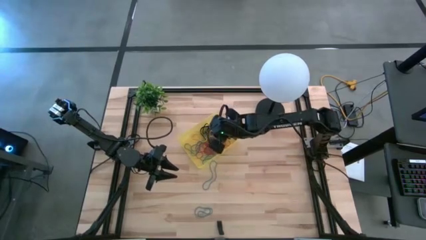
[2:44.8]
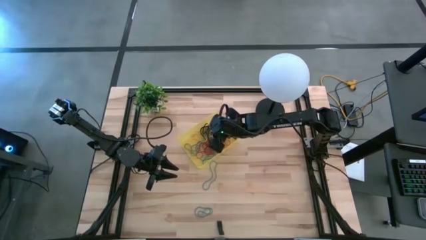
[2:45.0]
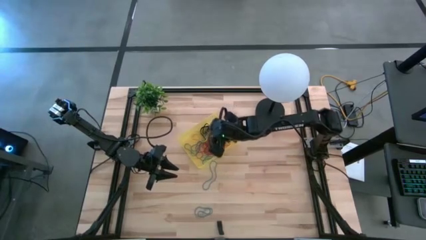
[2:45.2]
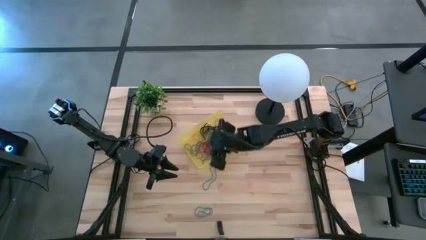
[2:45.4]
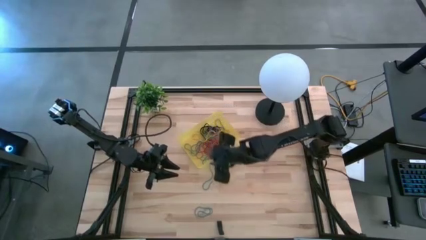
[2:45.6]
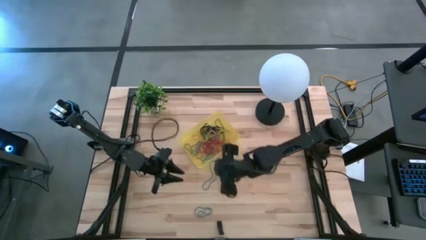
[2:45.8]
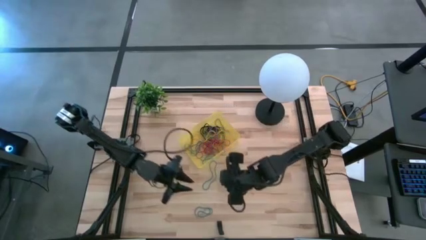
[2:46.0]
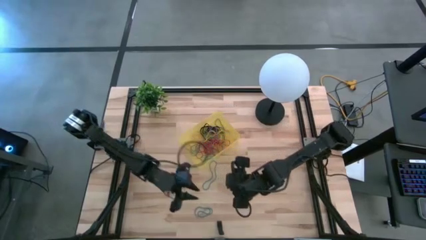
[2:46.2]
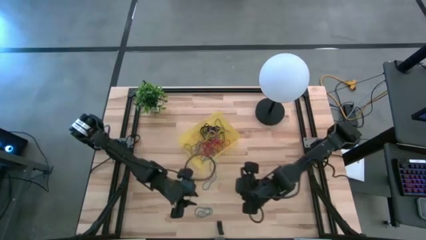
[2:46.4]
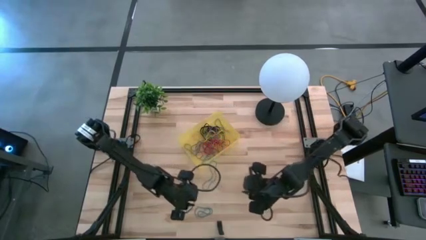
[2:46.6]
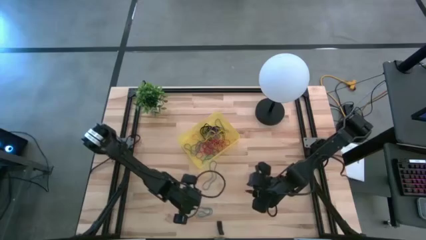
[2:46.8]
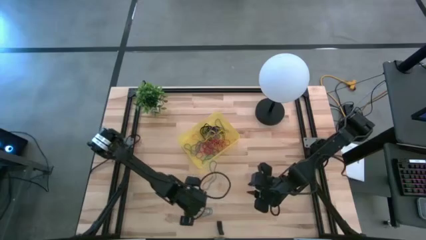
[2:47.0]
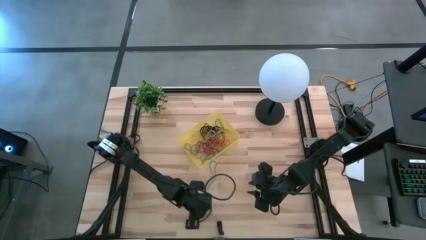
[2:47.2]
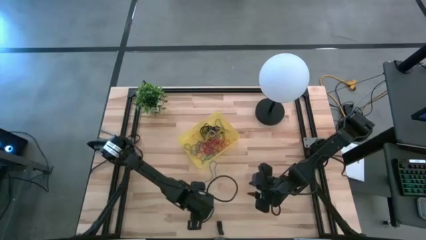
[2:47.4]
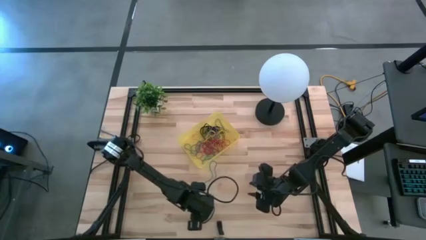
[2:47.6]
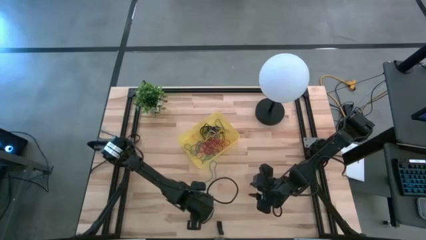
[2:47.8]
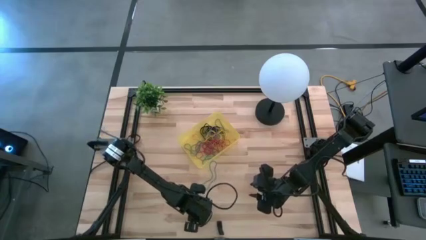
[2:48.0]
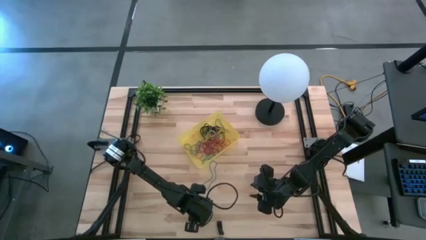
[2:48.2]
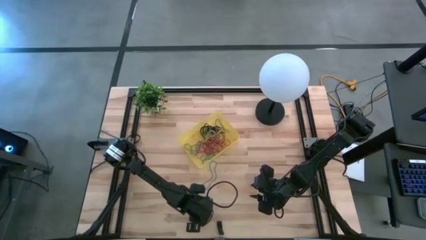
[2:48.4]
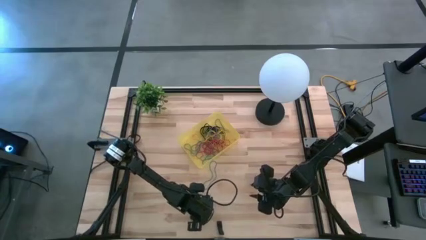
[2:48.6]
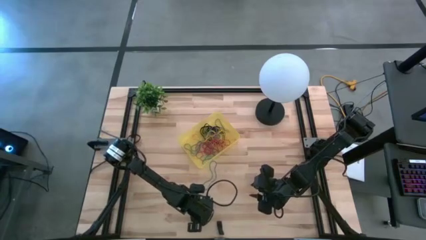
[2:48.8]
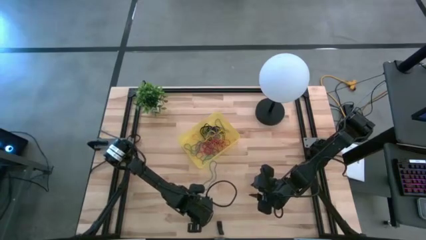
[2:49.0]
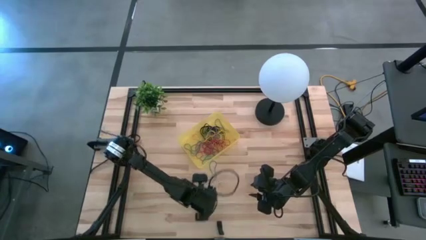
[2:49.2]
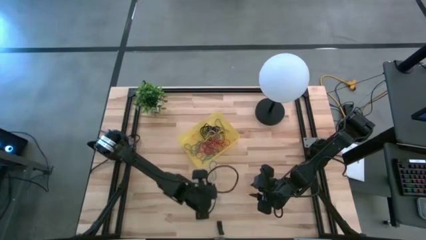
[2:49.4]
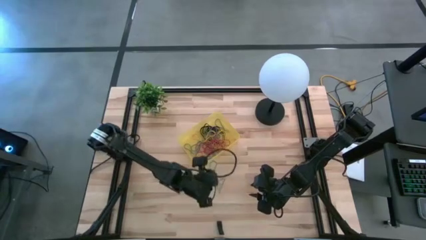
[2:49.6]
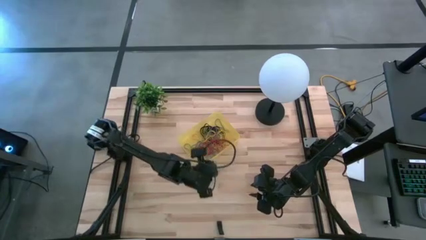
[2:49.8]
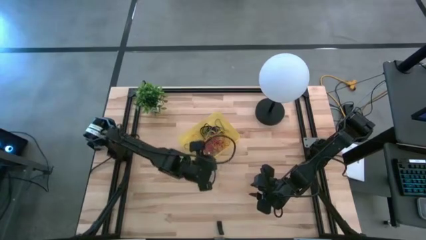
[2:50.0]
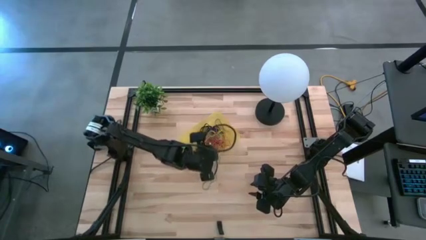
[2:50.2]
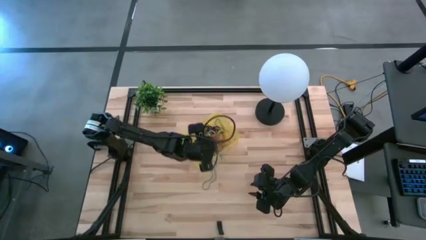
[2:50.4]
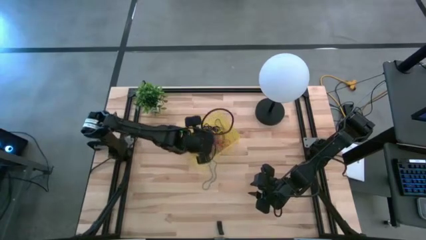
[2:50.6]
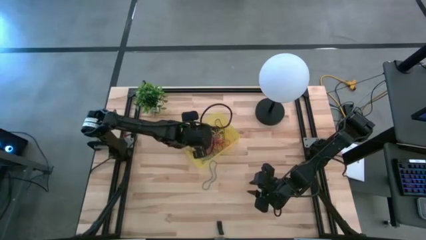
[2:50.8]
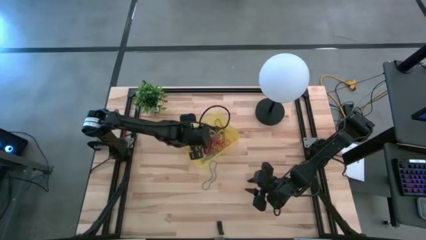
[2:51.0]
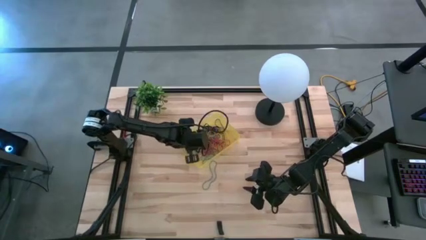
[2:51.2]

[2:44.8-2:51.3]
Task: Pick and place rubber bands into bin
Put the blue rubber band into the yellow bin

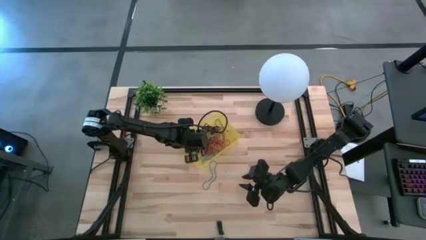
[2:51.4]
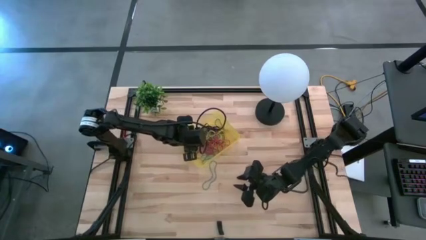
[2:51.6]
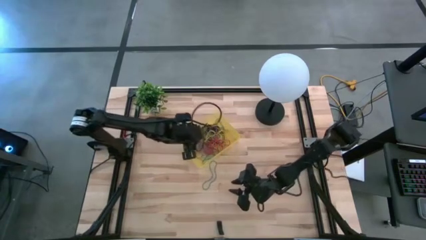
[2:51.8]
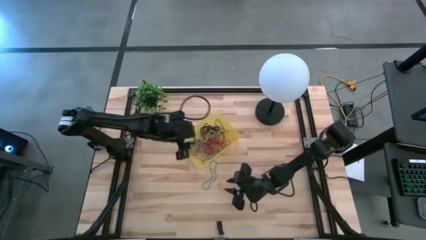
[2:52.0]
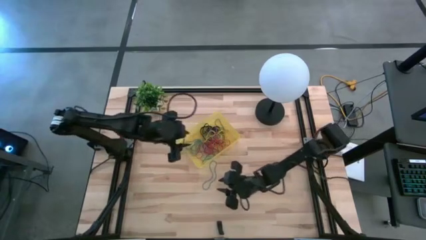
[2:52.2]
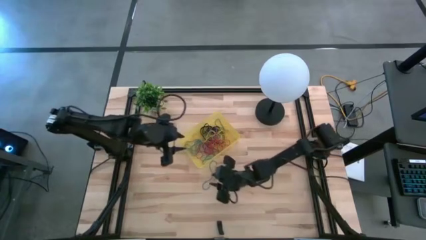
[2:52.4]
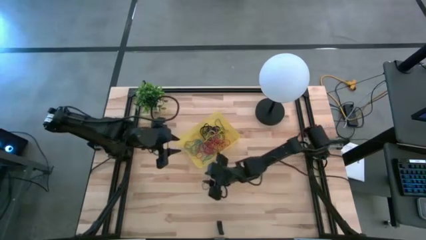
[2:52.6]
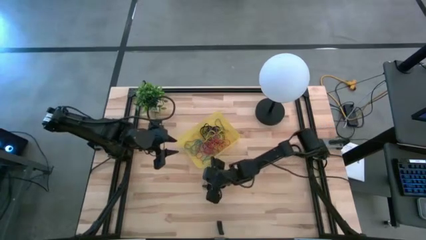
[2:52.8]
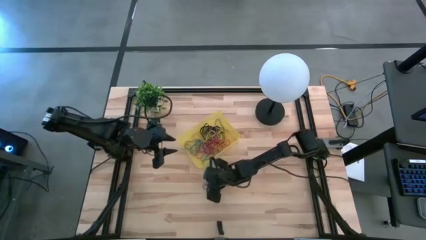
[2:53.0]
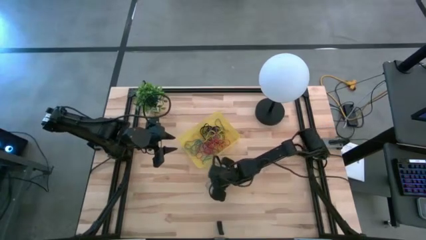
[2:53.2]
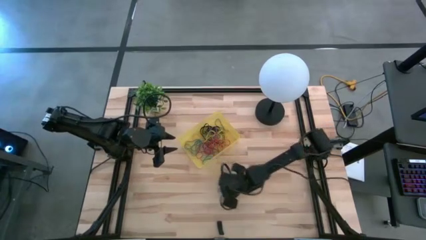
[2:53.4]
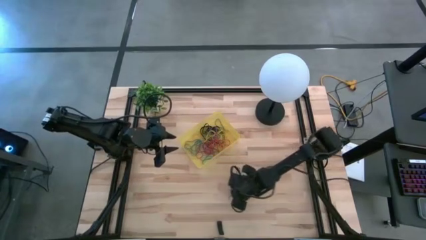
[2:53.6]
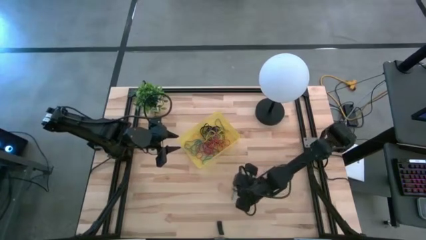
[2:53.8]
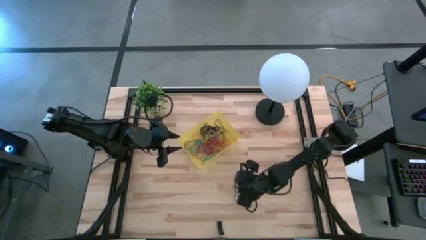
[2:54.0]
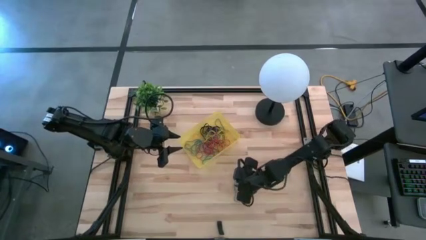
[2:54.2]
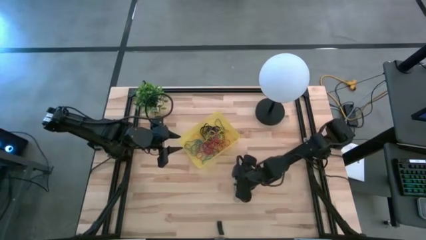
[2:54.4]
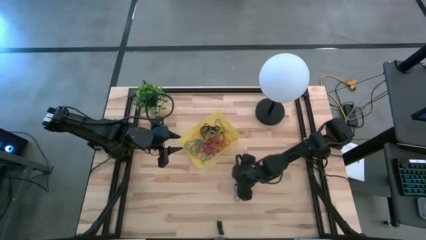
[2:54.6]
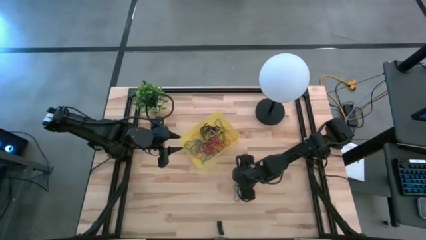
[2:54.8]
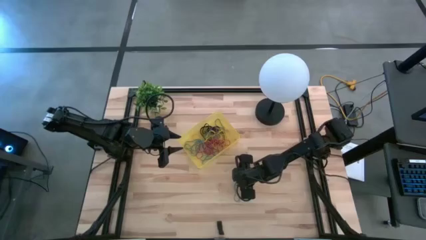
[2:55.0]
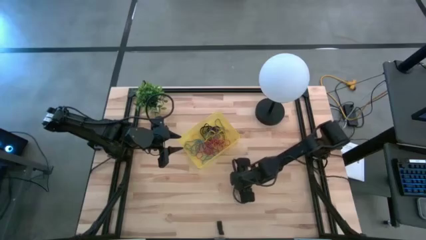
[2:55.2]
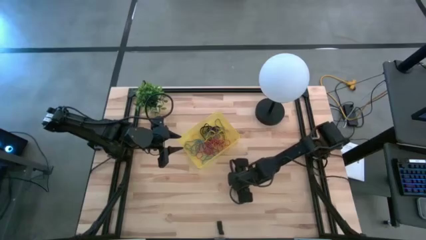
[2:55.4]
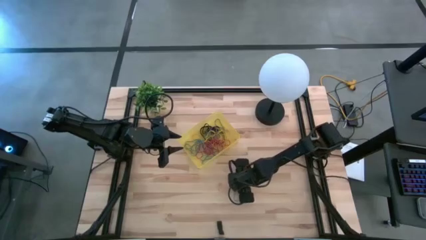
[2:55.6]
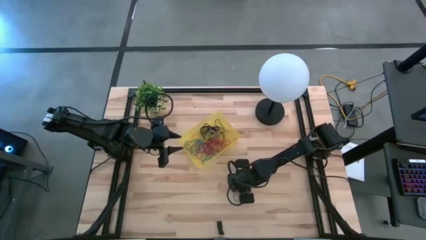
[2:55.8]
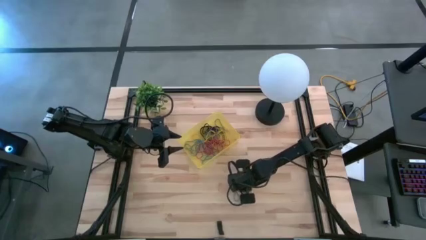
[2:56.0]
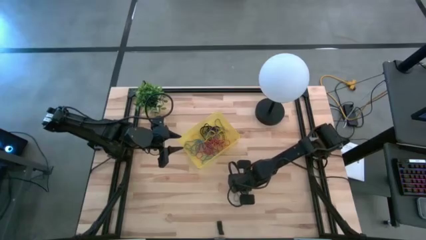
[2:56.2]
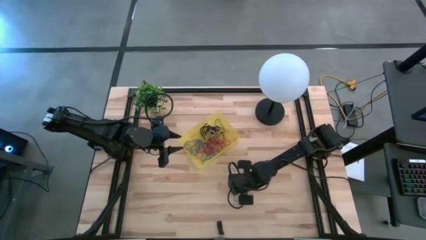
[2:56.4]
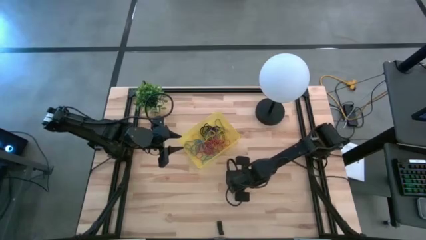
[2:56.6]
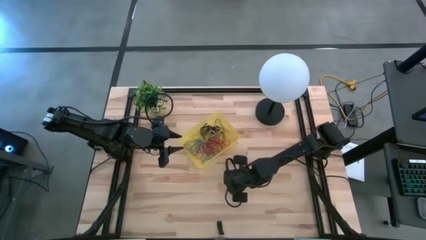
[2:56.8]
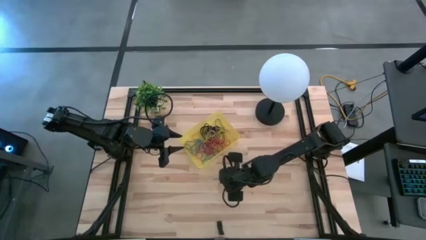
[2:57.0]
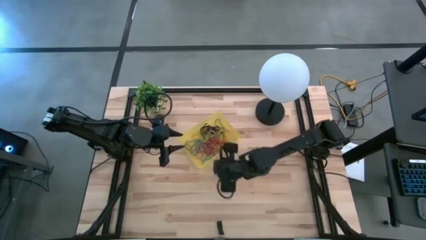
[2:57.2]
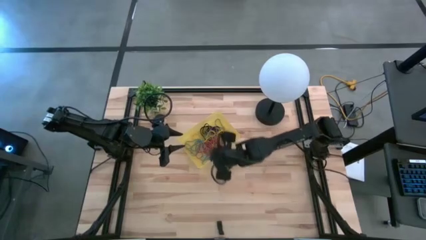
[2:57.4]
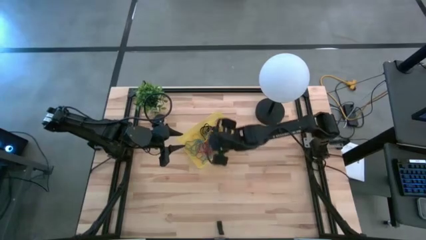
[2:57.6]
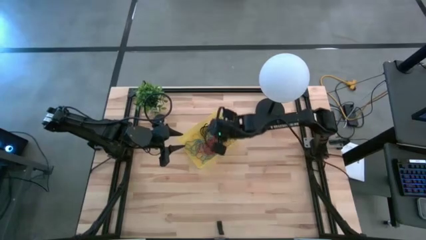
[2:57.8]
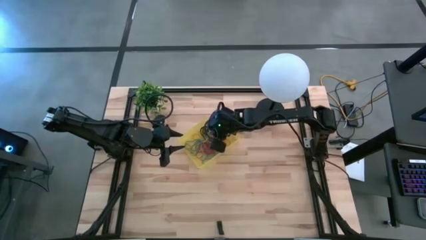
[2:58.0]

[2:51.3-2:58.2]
Put the blue rubber band into the yellow bin

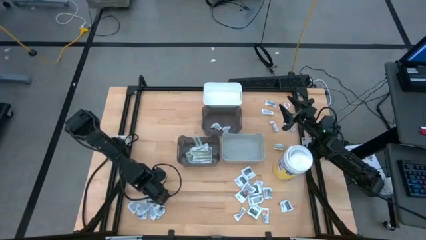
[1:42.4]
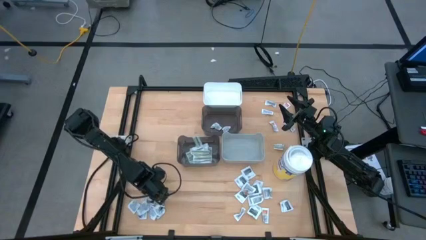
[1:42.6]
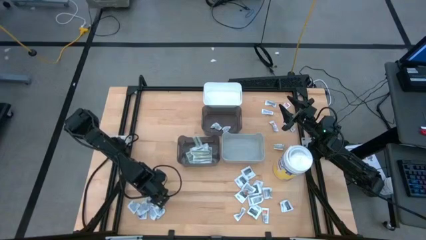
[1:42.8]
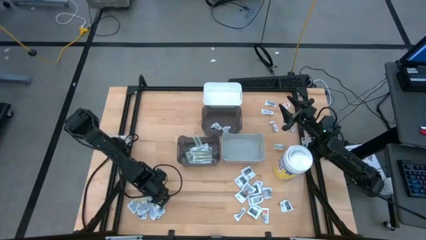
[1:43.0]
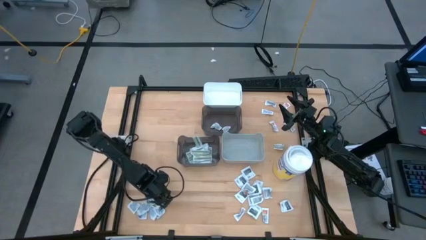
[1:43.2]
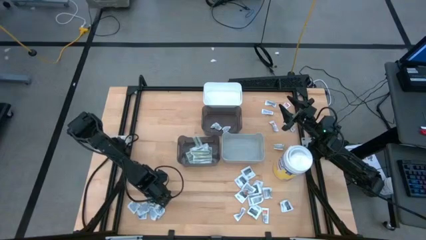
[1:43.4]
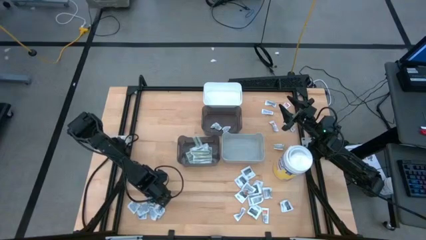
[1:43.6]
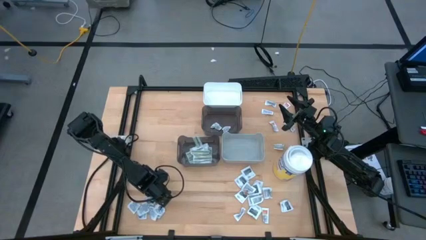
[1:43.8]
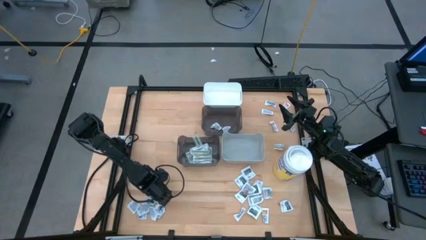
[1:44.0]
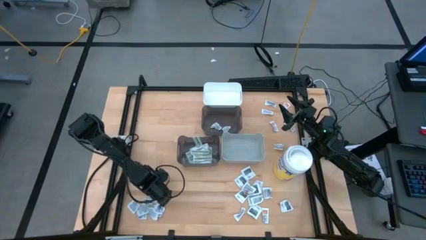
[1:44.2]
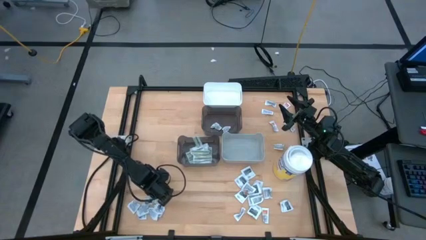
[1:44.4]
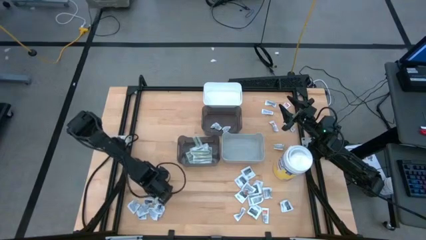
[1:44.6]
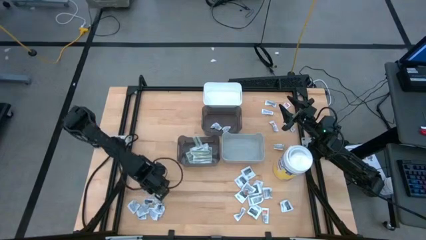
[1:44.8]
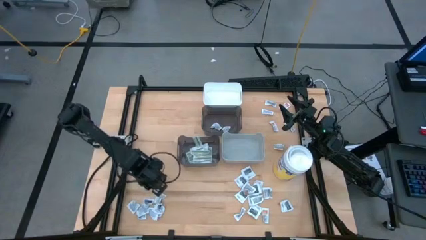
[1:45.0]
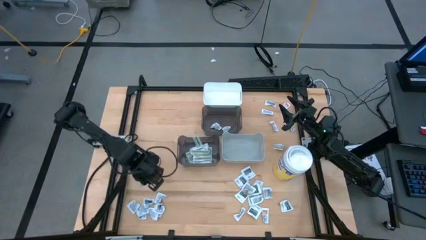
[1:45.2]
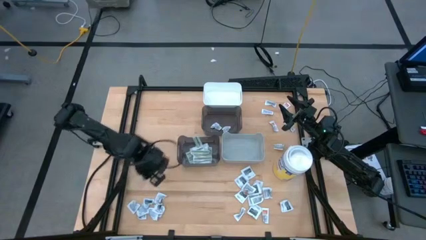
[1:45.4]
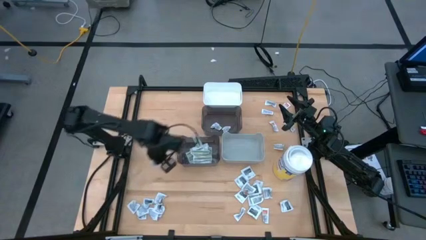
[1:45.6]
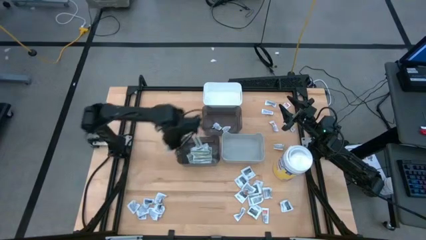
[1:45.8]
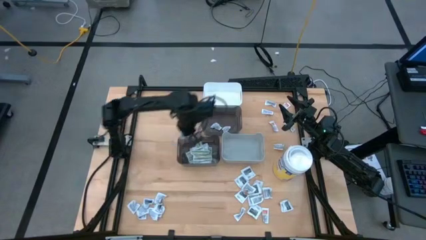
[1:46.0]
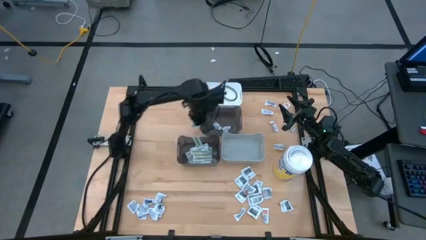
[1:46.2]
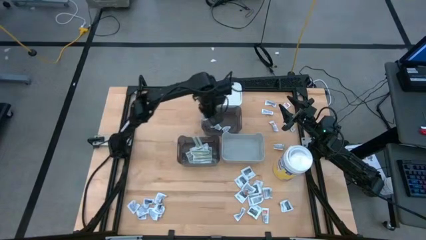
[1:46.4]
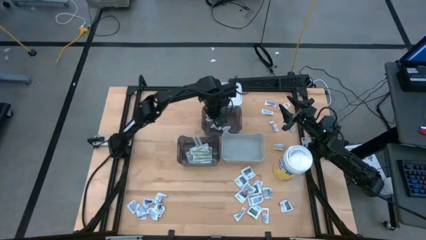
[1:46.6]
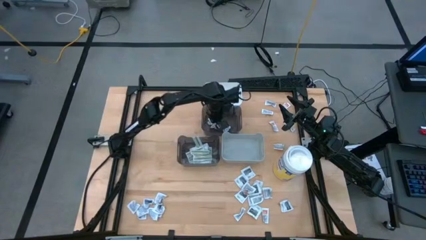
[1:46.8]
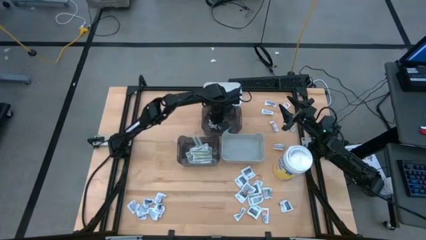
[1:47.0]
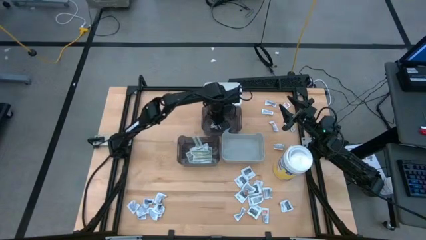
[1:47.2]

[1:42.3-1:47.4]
Task: Pick & Place First Aid Supplies
Put the white alcohol pad into the top black bin
